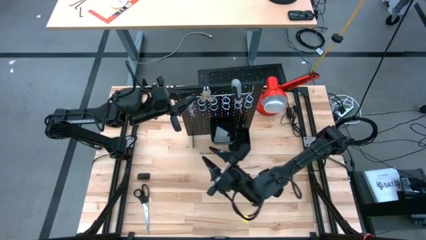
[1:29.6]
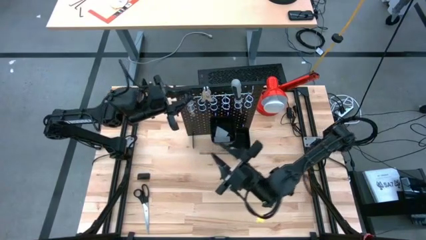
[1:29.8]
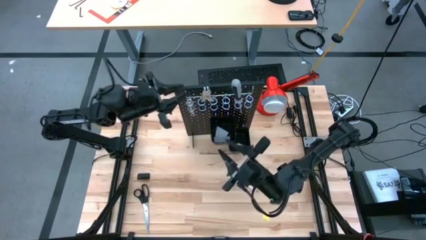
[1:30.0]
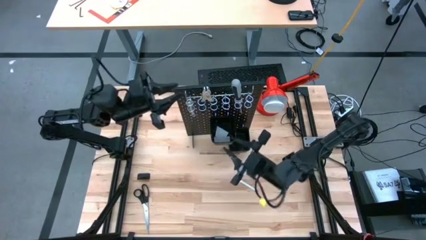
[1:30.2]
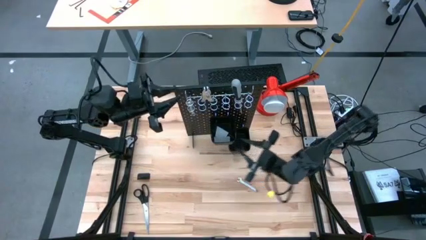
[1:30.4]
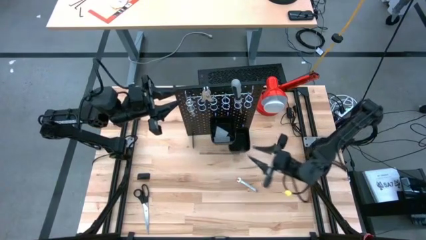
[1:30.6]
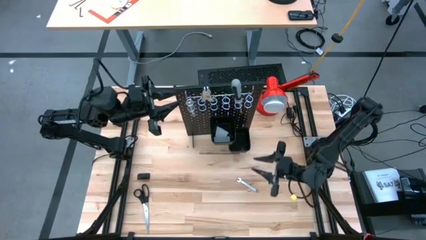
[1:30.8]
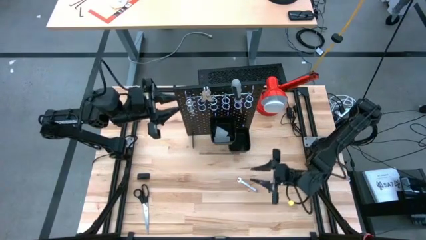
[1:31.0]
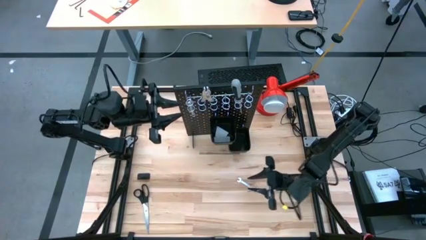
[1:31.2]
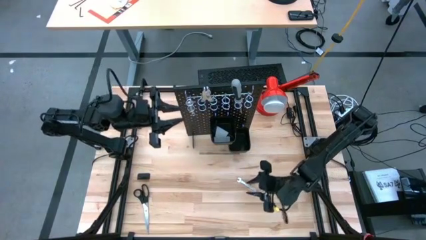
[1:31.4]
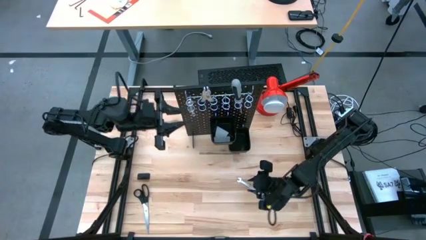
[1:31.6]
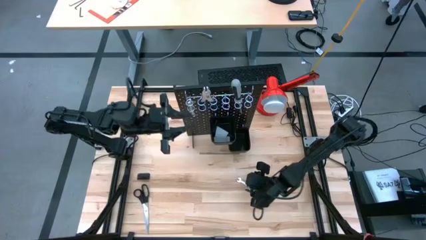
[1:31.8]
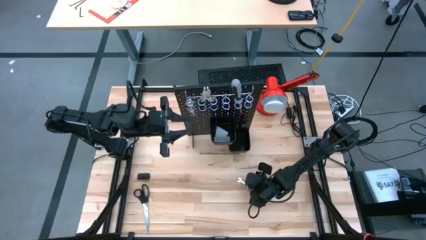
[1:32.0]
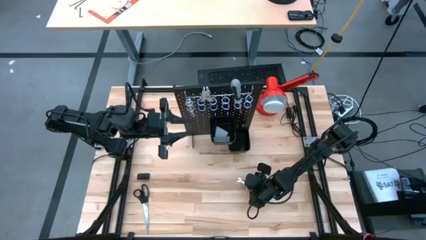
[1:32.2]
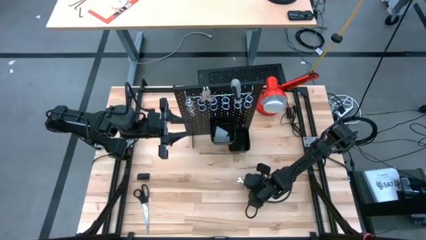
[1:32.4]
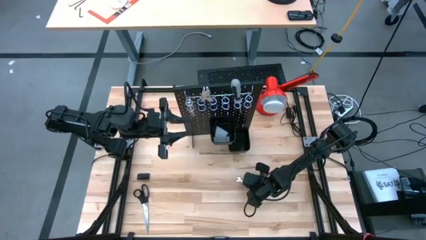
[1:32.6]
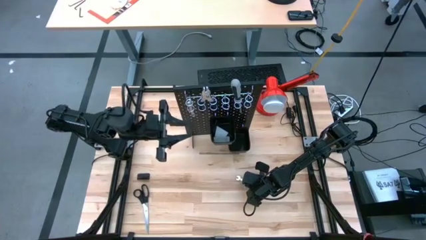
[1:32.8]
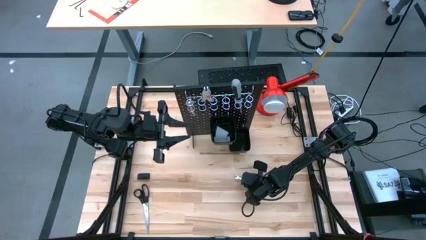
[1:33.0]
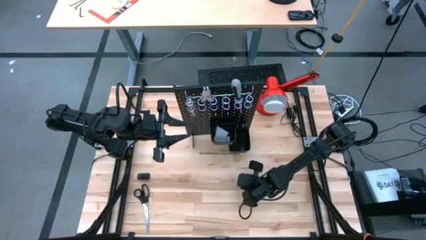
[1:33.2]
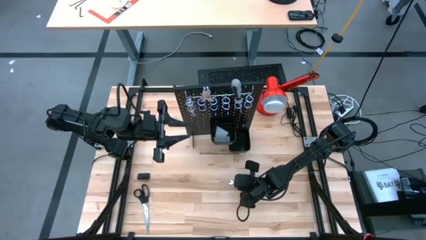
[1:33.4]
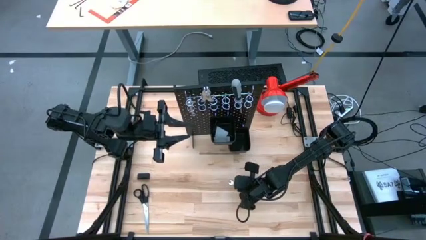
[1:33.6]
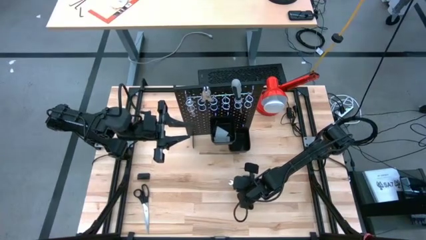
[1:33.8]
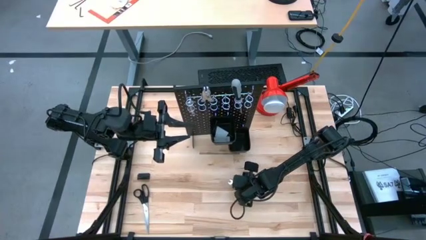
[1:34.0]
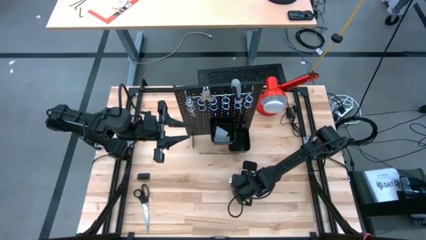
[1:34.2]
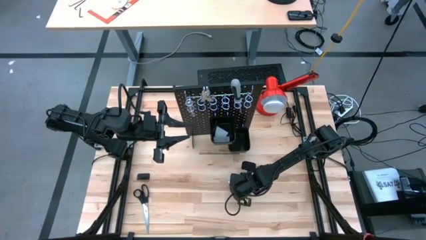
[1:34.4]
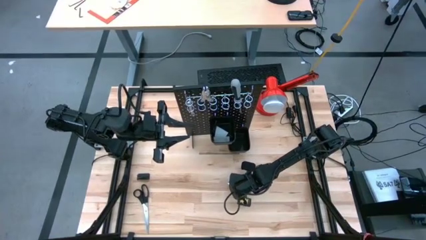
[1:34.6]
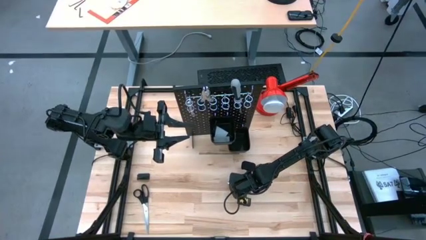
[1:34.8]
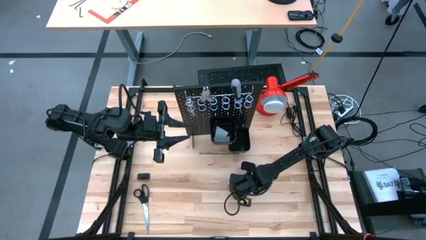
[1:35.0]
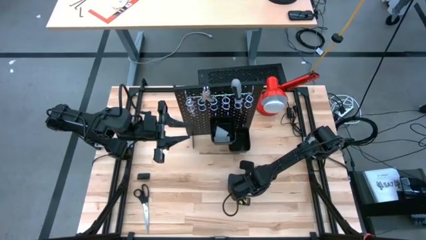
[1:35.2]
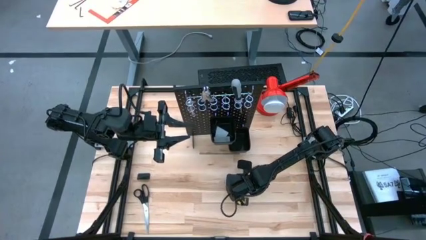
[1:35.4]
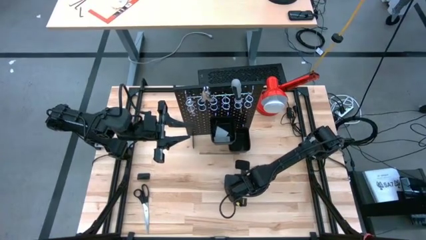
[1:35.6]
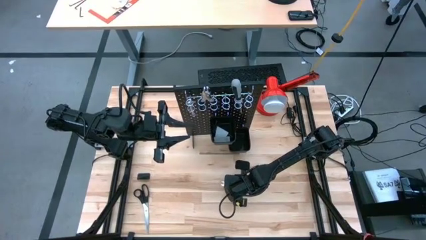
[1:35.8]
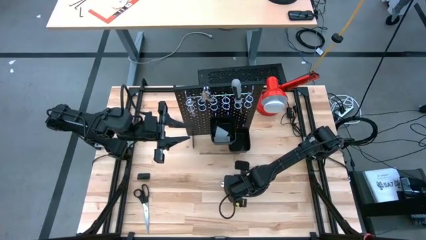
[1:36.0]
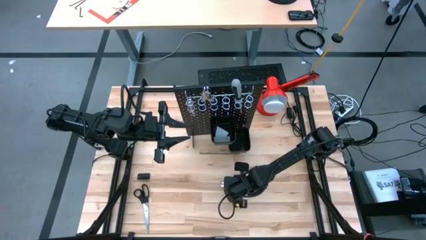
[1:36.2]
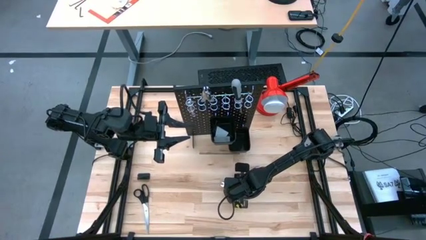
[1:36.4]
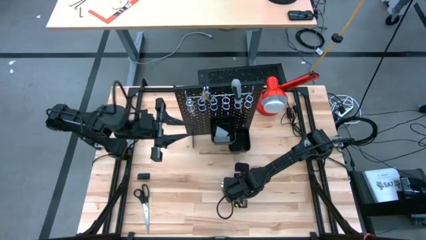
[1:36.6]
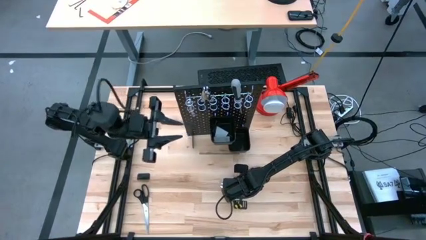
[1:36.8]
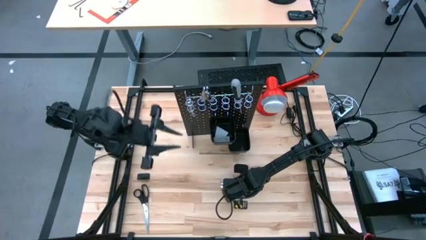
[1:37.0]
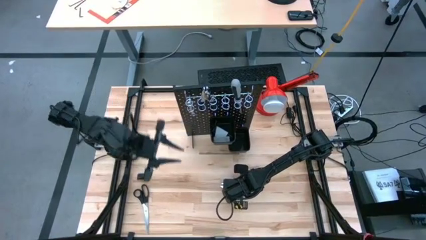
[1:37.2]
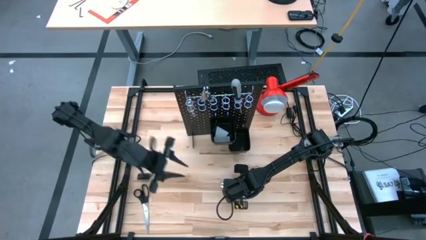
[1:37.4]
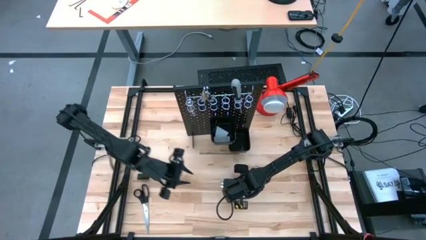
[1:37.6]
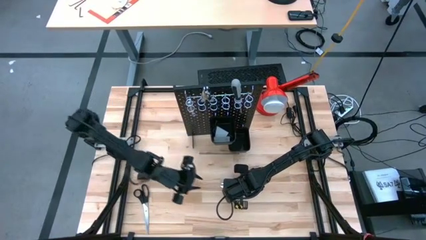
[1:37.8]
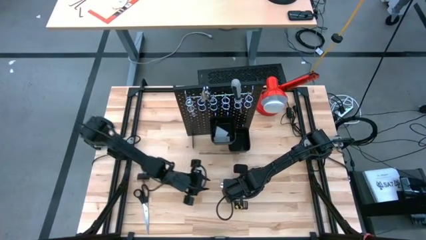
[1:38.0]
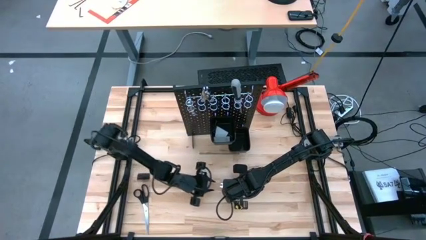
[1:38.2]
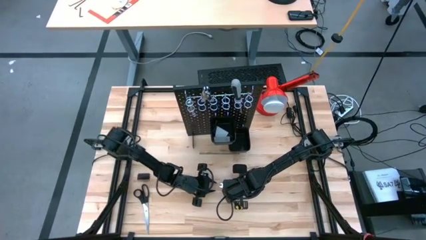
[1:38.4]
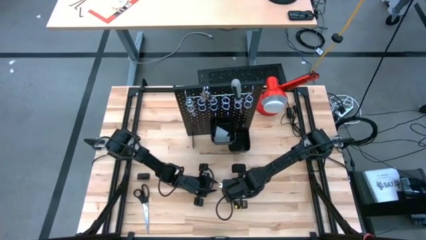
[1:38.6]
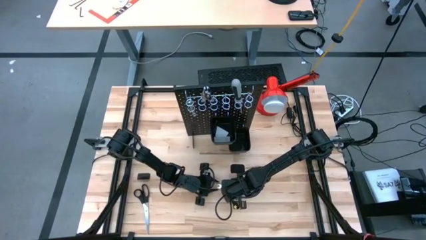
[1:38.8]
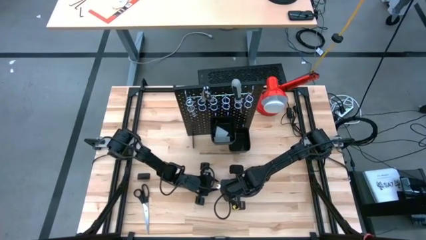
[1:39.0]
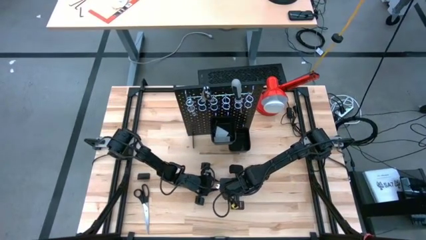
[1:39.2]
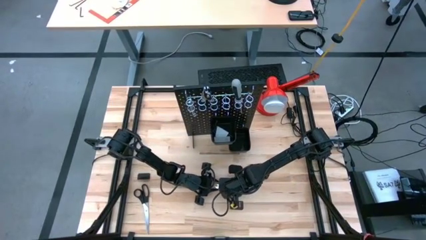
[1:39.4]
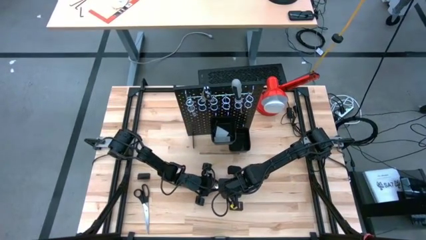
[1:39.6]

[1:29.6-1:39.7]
Task: Hang tools onto peg board
Hang the wrench on the pegboard

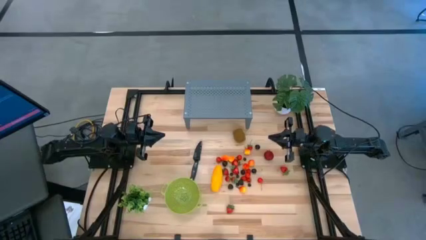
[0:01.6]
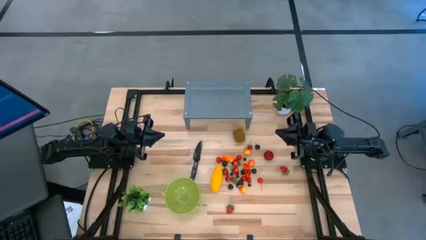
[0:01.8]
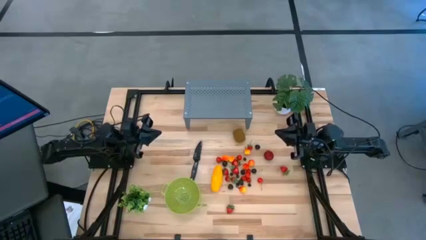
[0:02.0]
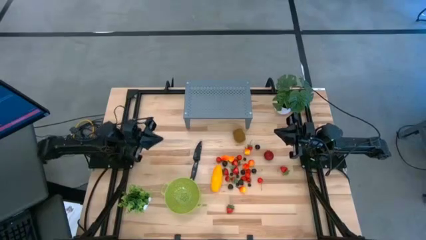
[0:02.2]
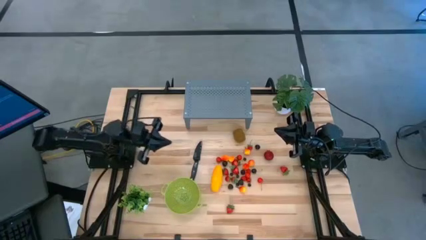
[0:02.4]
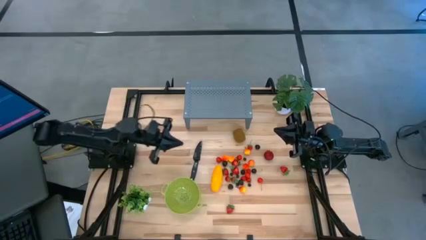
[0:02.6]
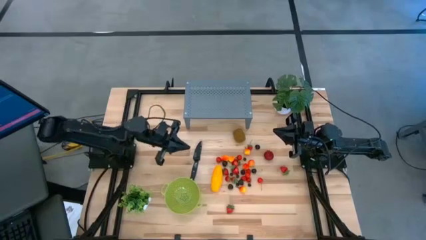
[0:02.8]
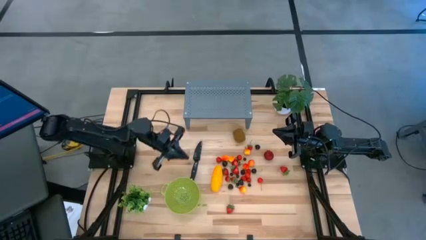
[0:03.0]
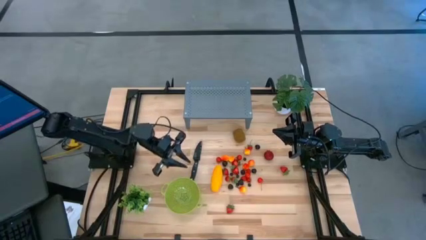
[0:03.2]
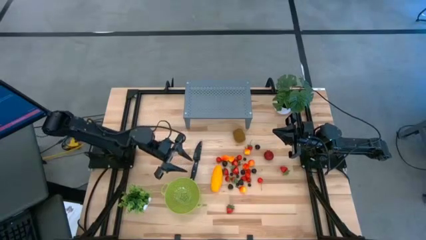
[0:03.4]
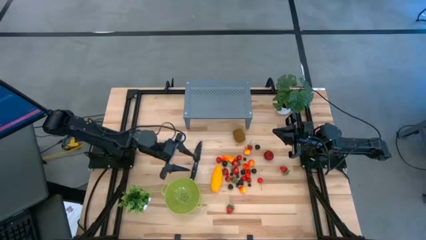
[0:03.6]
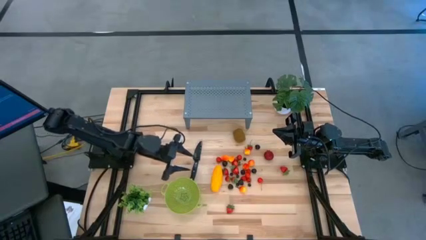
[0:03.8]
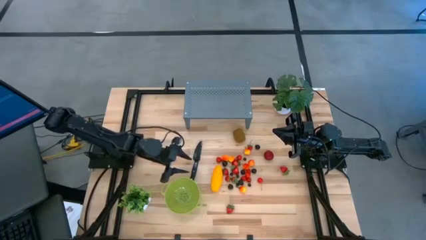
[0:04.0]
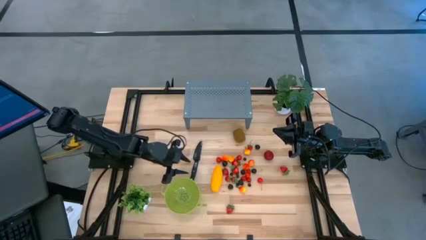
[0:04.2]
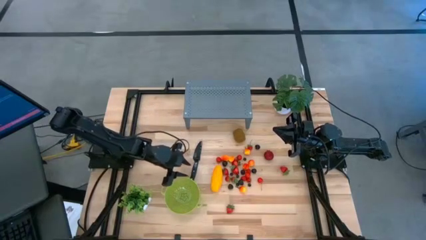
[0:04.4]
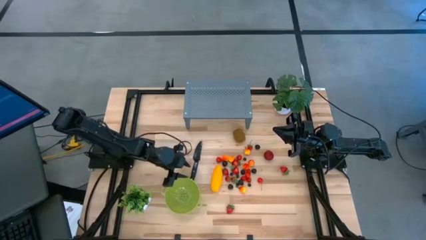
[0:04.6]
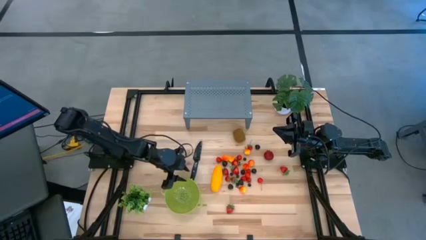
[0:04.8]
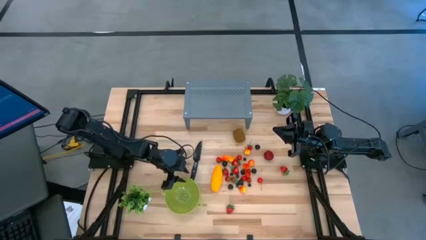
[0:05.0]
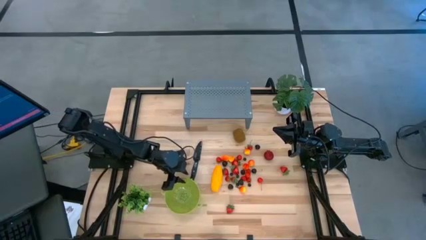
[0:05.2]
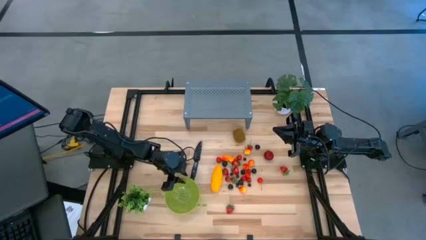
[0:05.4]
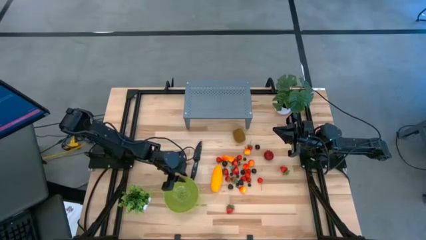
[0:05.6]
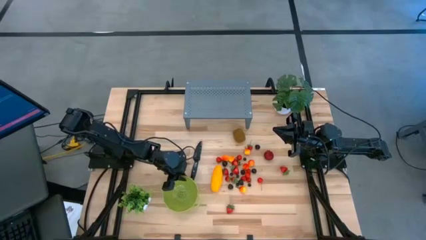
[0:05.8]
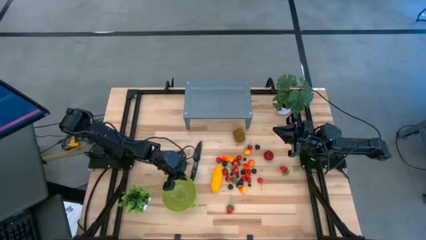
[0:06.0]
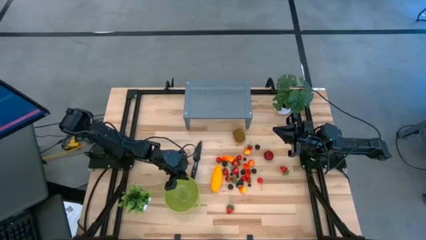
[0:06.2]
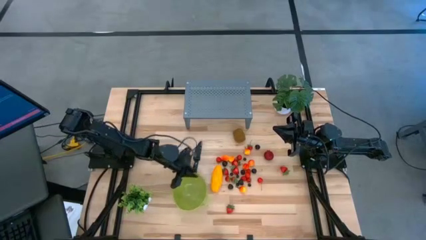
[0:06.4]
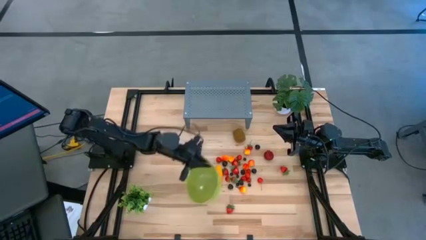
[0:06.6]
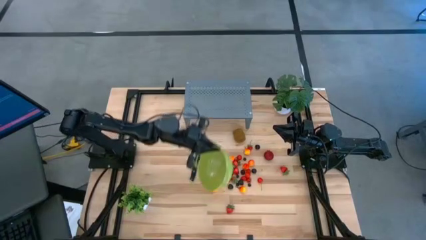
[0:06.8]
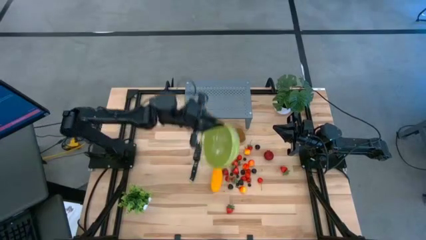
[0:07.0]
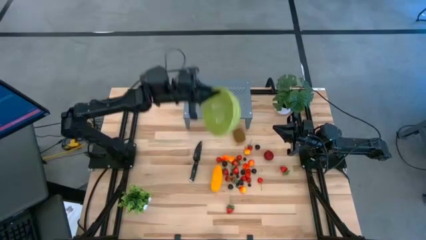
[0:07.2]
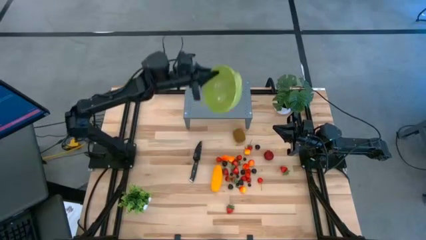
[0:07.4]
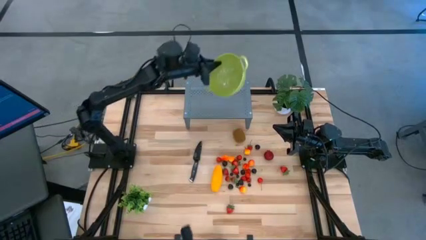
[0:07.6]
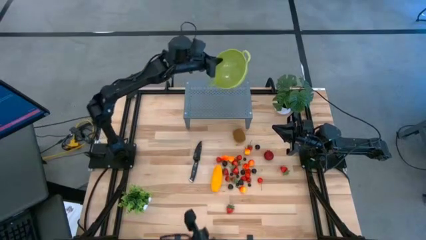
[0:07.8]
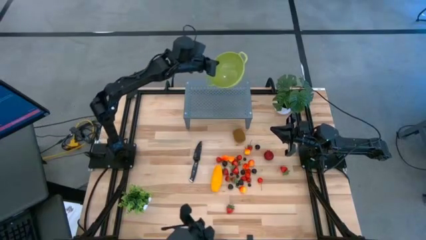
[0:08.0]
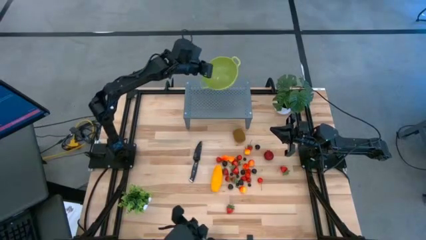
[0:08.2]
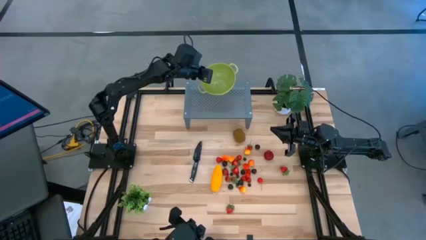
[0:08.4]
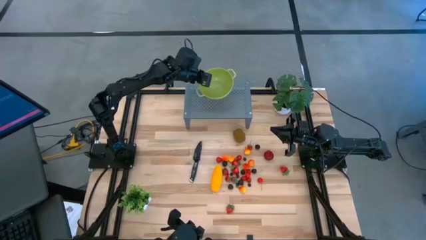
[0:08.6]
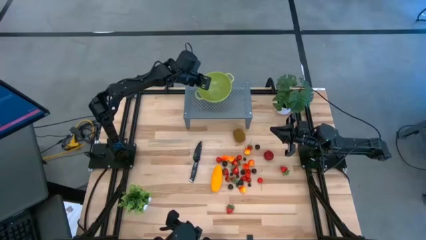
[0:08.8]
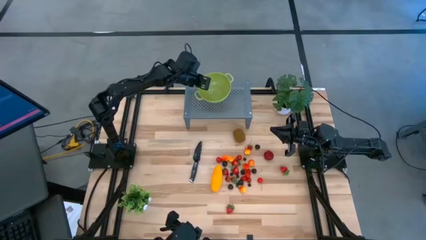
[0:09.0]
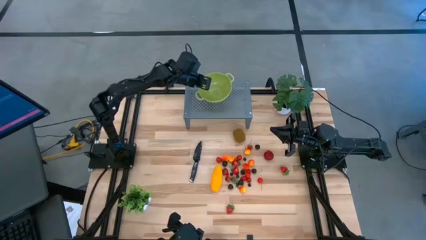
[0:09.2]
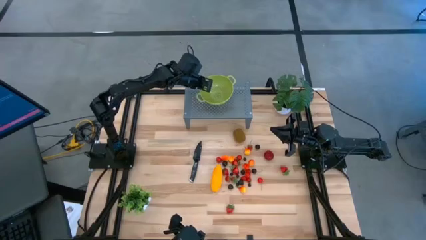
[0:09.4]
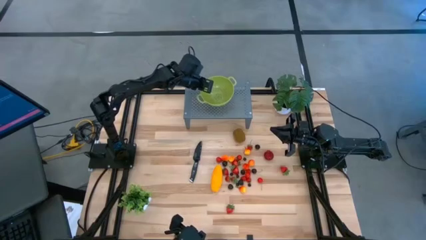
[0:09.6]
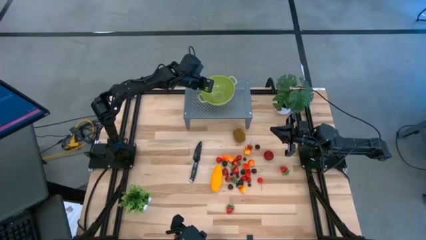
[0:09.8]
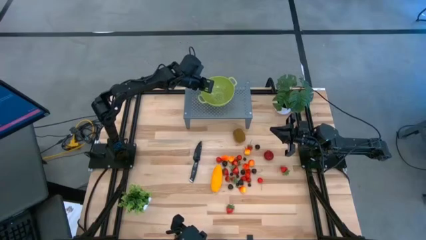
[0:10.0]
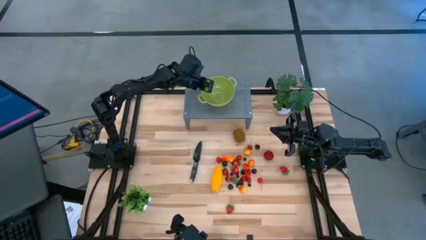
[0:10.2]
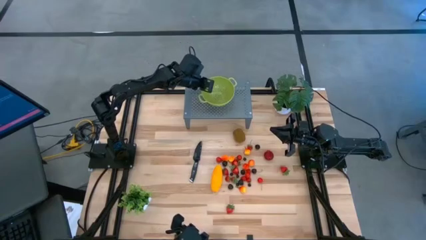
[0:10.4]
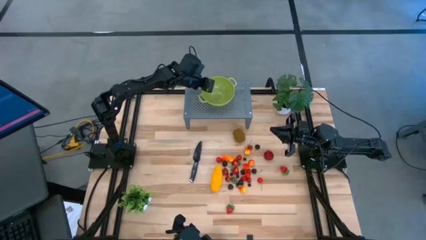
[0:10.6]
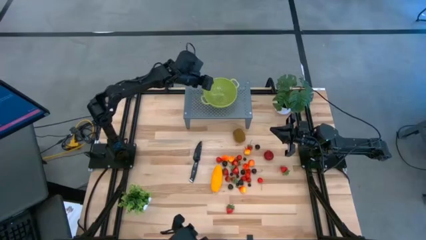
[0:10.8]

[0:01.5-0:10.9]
Task: Pick & Place Fruit
Put the green strainer bowl on the shelf
